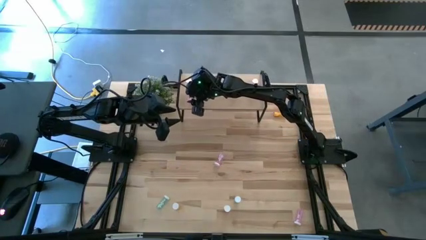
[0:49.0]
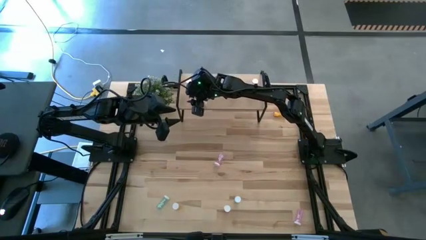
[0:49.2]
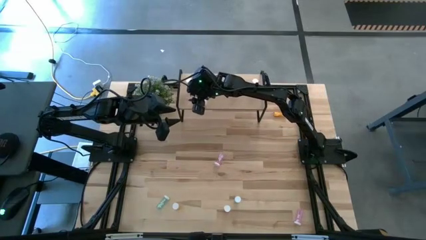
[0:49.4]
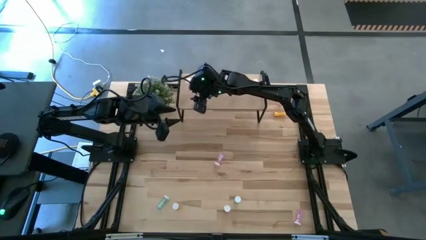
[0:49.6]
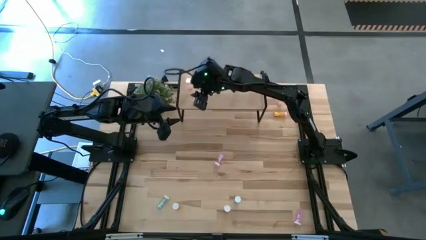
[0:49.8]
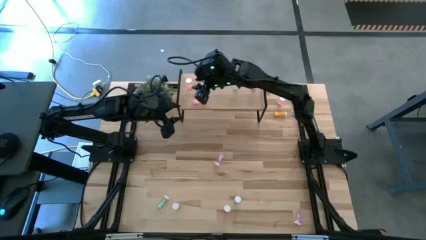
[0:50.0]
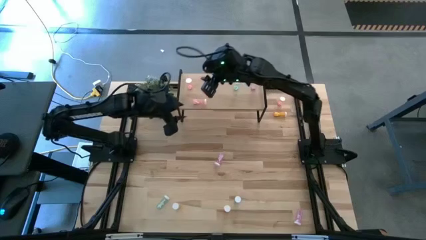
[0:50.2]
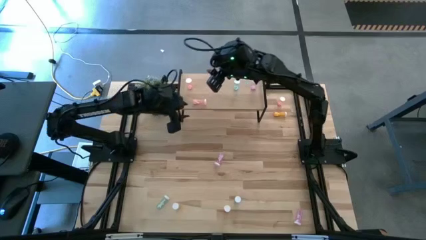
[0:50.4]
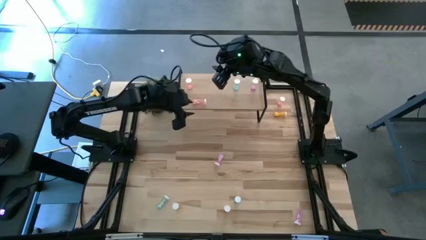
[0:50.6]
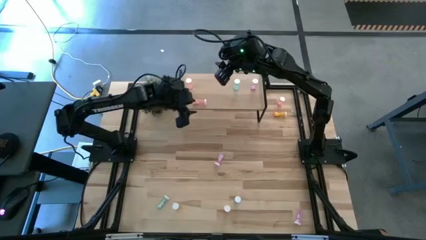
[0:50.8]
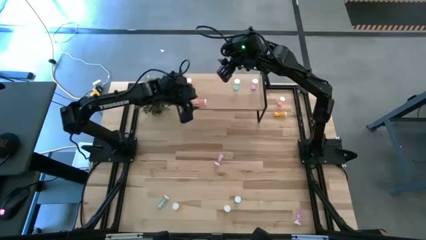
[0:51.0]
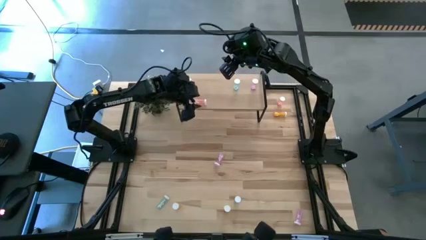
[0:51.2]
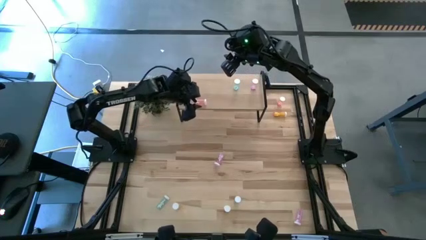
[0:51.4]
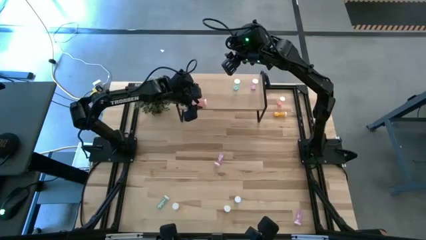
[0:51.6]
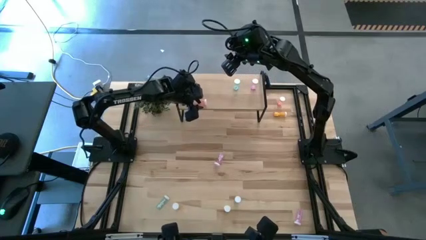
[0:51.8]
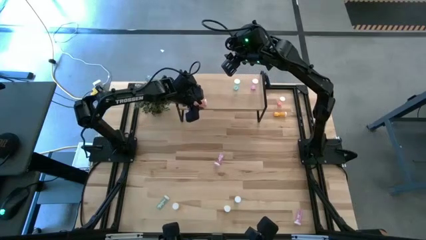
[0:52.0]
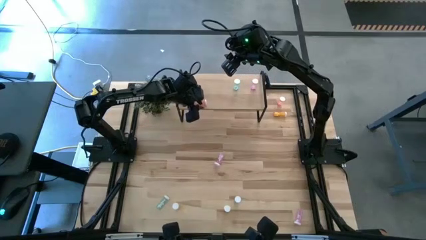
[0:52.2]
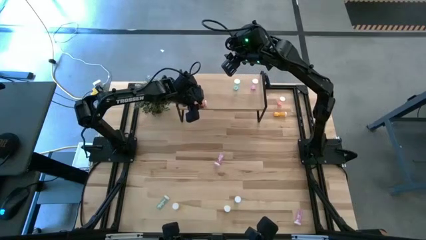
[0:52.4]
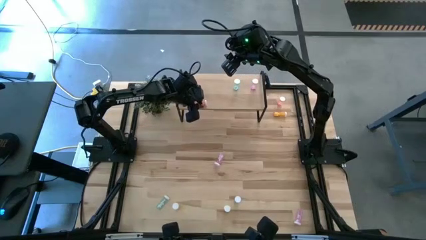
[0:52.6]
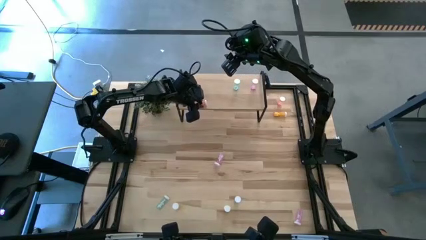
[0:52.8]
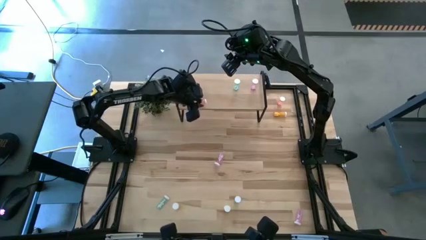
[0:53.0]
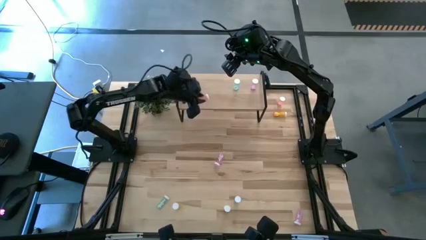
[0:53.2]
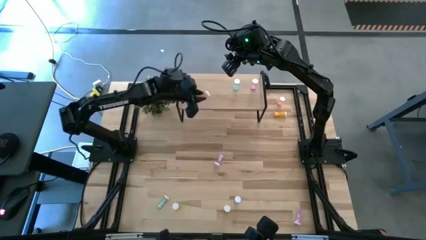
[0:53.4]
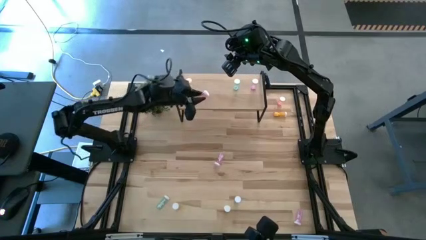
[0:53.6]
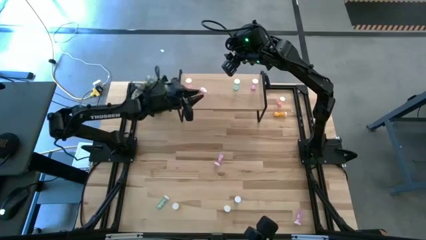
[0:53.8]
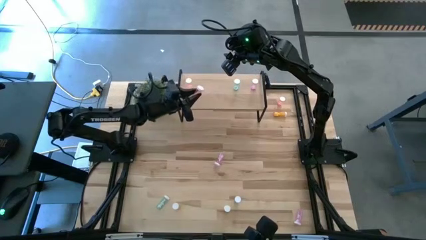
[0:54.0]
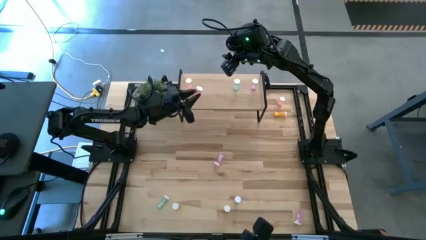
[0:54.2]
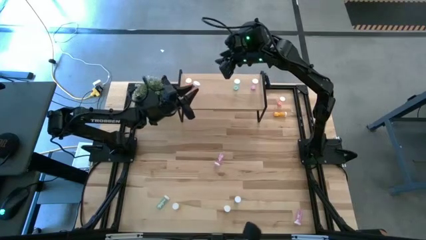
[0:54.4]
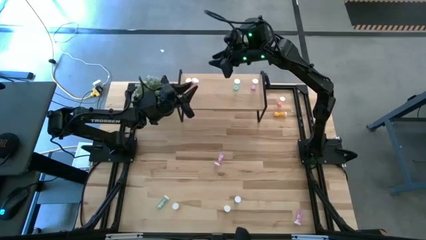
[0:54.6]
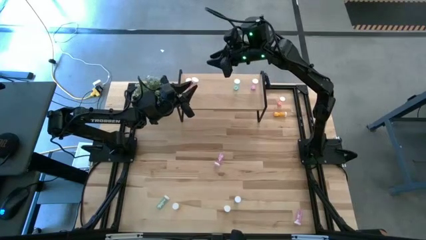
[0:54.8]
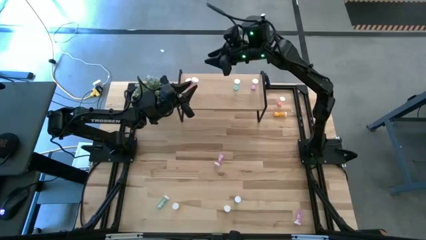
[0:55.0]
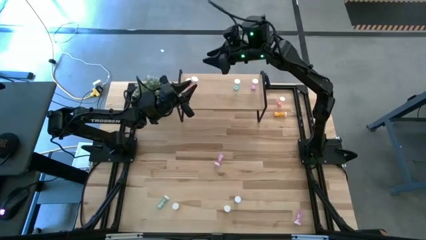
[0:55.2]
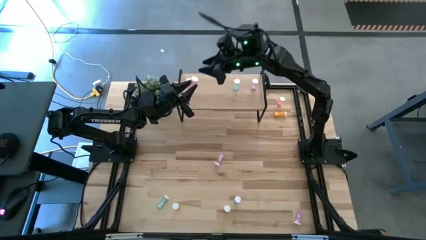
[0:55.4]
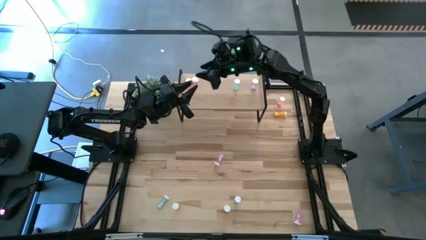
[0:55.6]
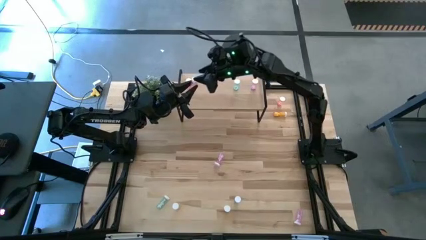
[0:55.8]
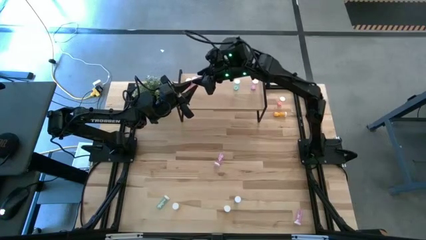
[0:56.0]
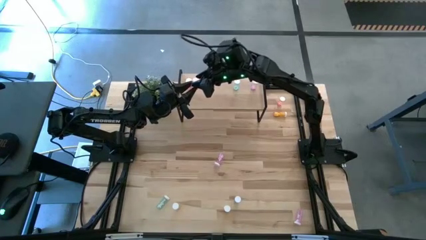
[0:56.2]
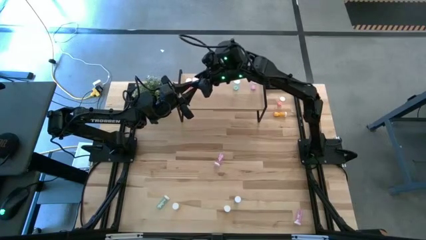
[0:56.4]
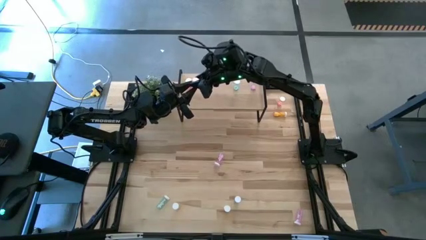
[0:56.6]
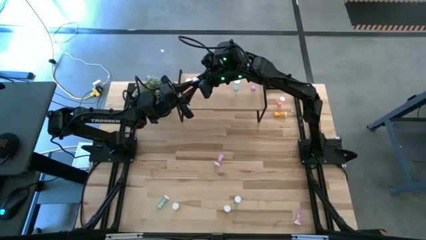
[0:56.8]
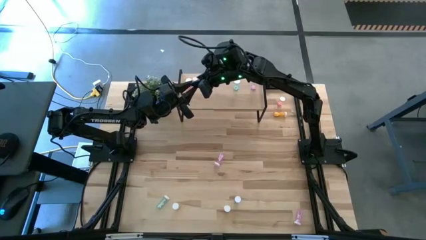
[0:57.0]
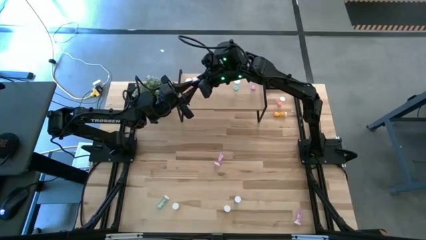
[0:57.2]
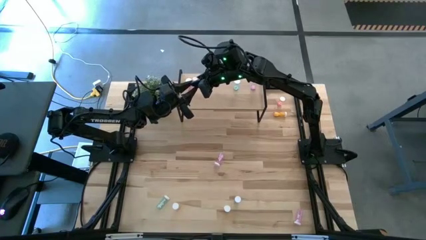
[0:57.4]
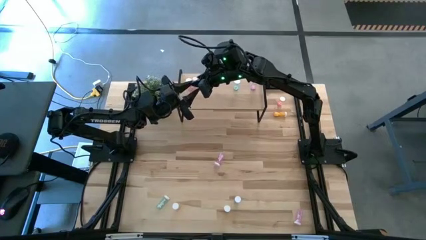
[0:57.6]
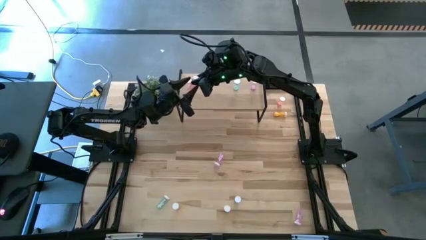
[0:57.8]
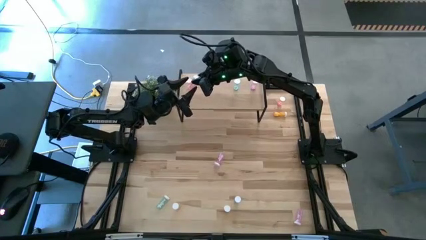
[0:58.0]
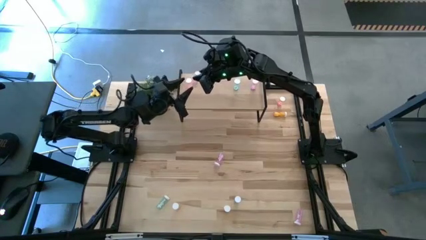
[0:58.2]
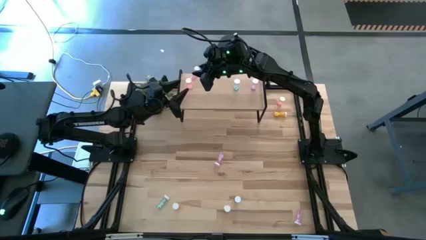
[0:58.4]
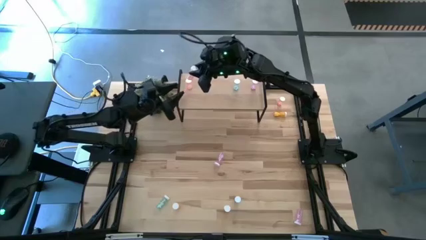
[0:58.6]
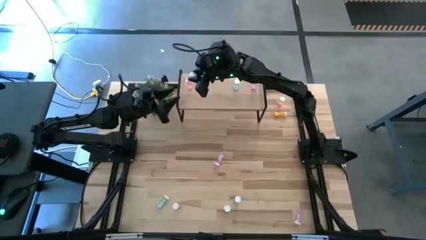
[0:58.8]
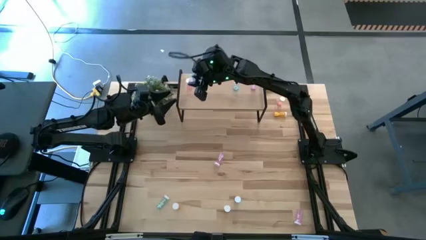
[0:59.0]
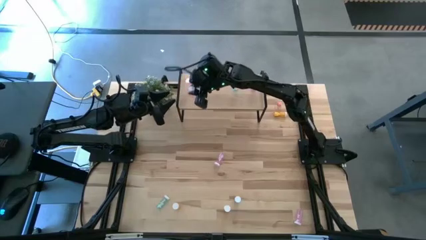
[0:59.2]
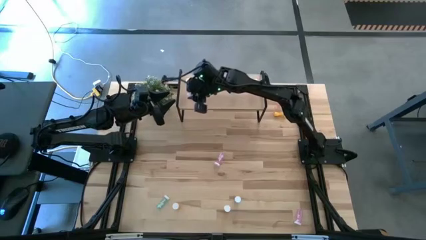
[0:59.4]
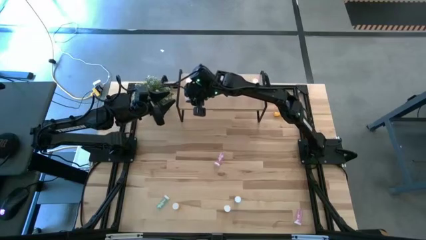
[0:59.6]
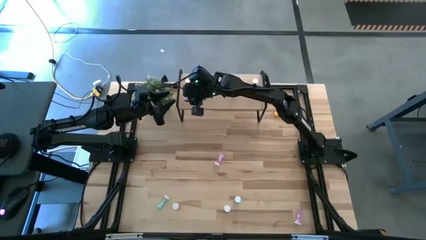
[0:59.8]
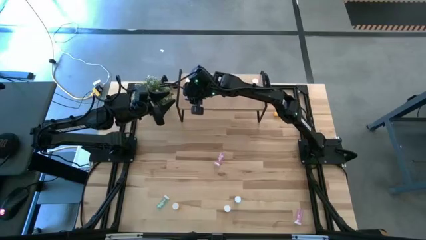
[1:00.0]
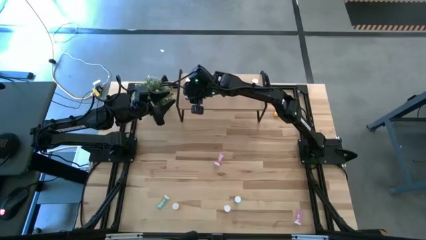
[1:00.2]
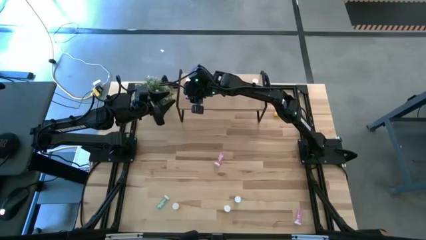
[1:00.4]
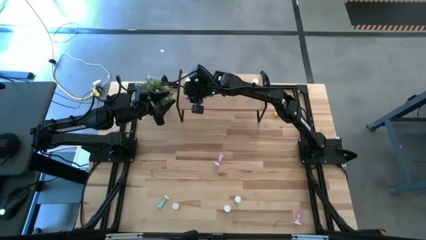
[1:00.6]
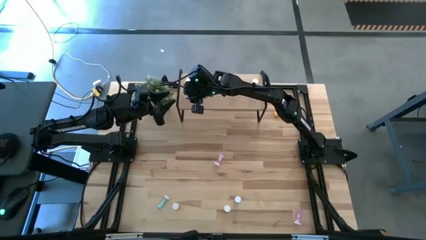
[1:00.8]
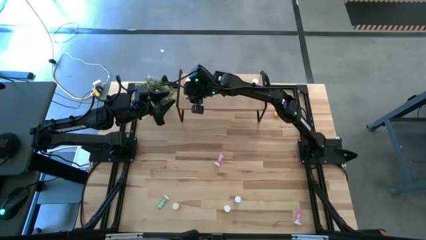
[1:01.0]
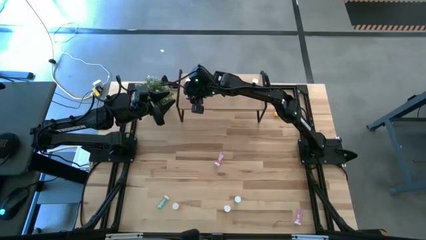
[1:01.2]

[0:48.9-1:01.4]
Task: Pick and place medicine bottles onto shelf by color
Put the bottom pink pill bottle on the shelf aligned with the other pink pill bottle
